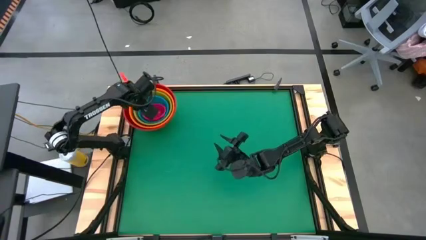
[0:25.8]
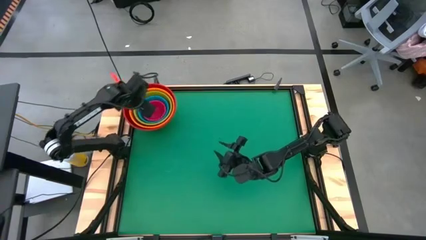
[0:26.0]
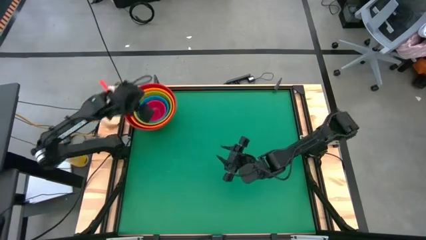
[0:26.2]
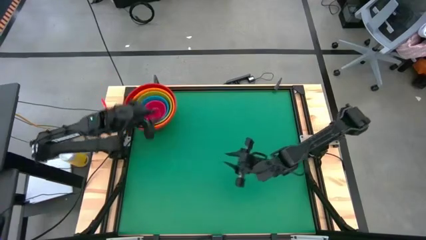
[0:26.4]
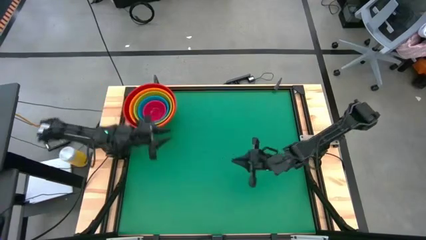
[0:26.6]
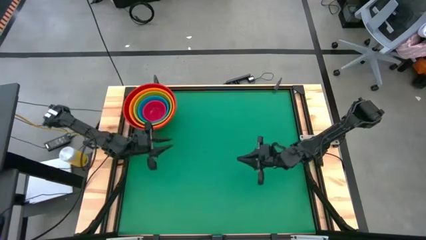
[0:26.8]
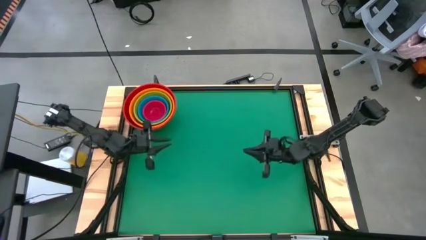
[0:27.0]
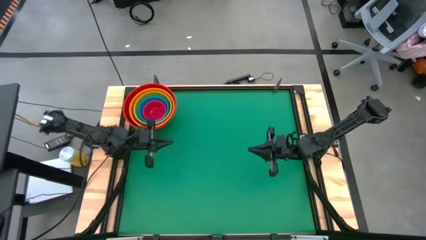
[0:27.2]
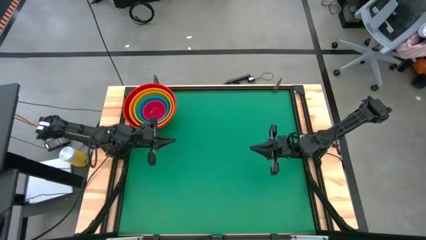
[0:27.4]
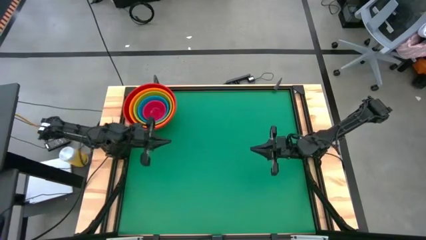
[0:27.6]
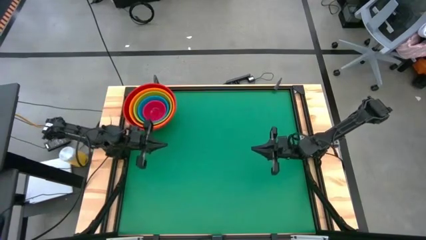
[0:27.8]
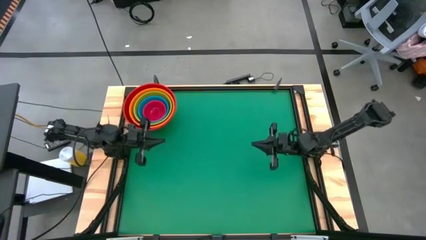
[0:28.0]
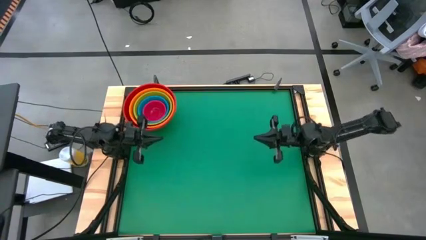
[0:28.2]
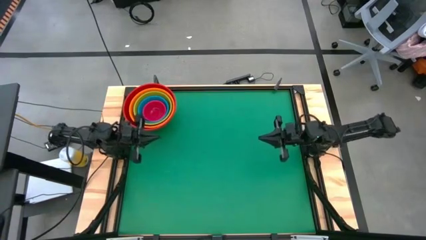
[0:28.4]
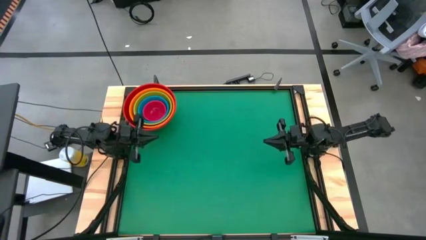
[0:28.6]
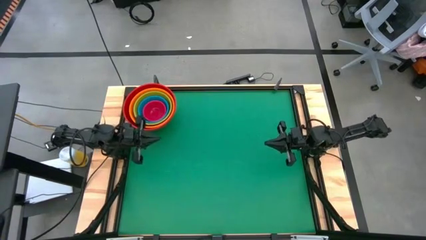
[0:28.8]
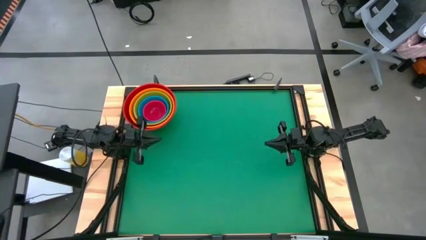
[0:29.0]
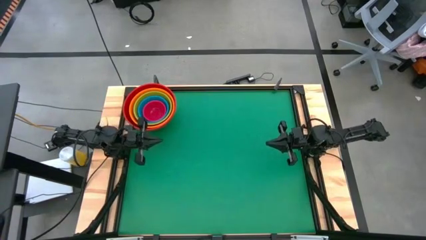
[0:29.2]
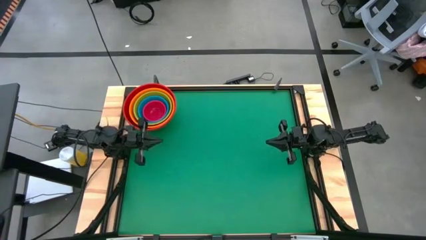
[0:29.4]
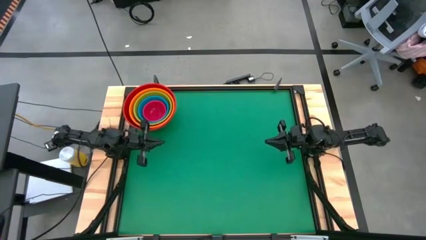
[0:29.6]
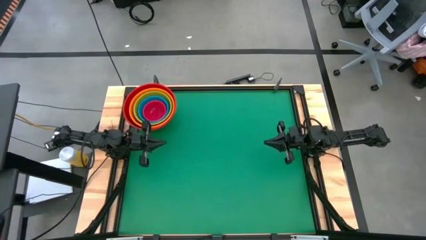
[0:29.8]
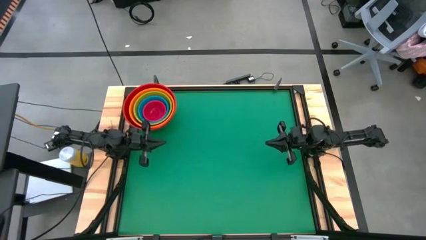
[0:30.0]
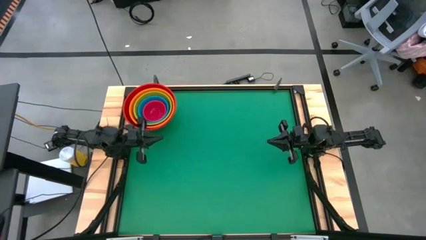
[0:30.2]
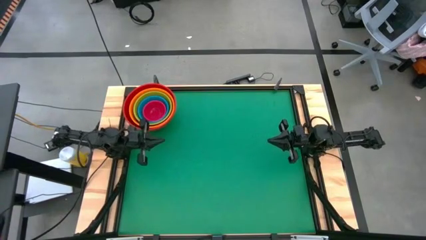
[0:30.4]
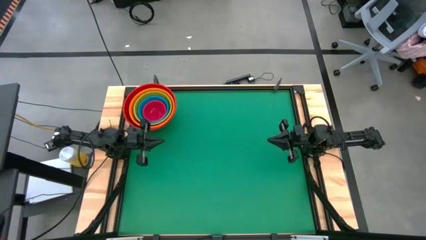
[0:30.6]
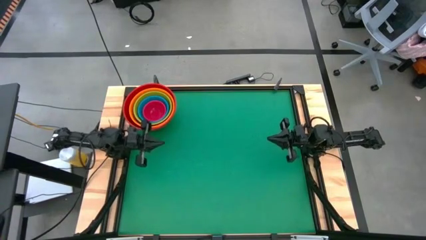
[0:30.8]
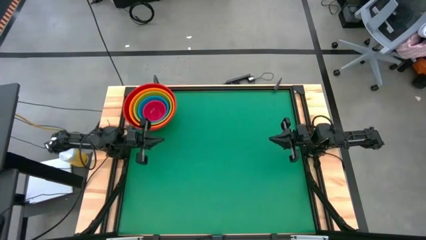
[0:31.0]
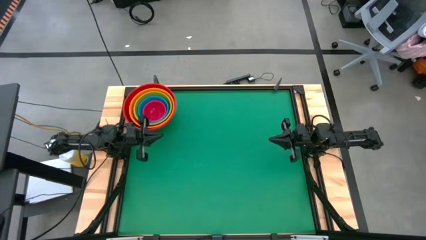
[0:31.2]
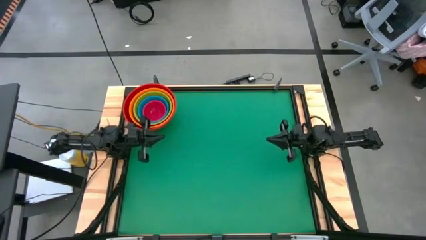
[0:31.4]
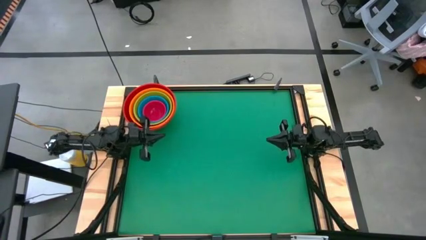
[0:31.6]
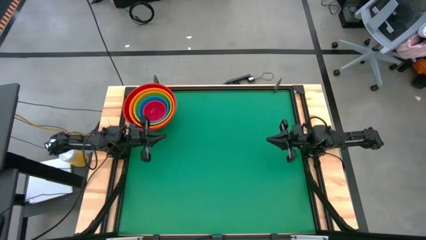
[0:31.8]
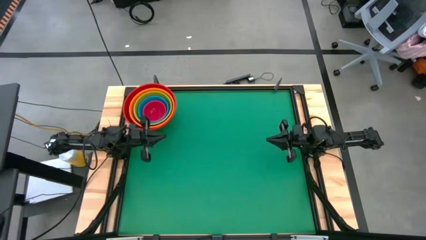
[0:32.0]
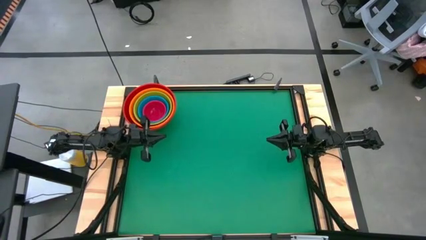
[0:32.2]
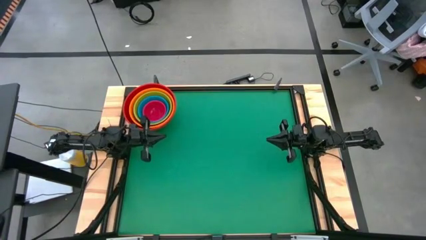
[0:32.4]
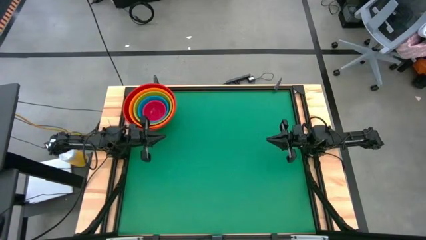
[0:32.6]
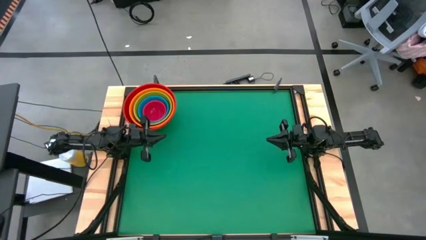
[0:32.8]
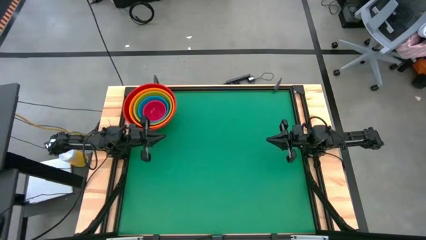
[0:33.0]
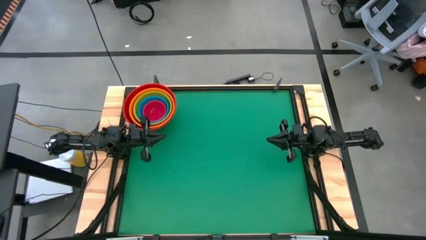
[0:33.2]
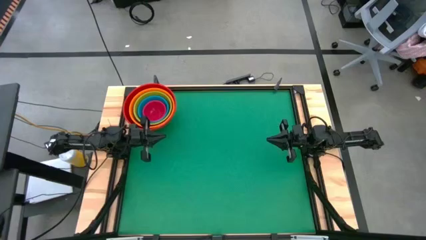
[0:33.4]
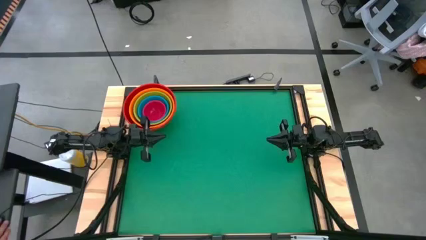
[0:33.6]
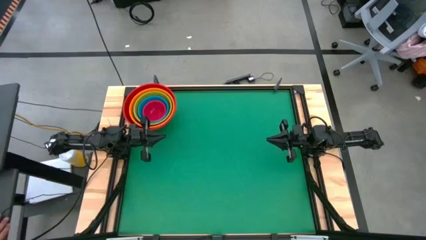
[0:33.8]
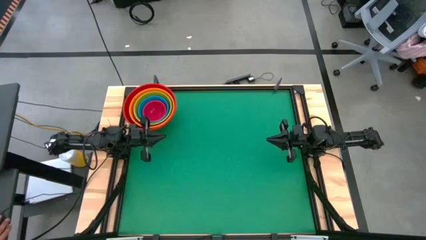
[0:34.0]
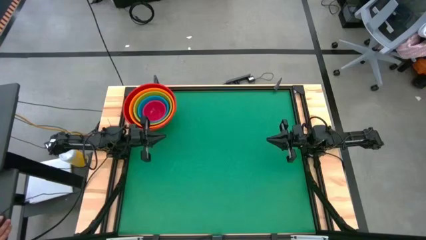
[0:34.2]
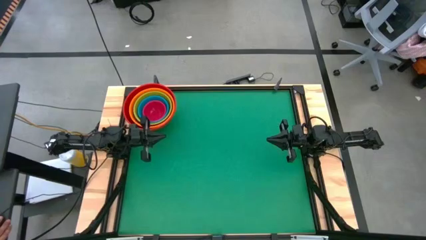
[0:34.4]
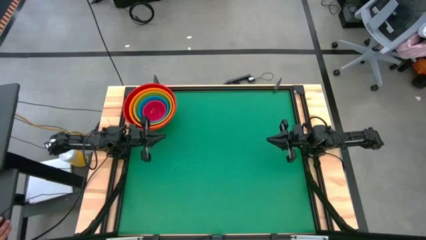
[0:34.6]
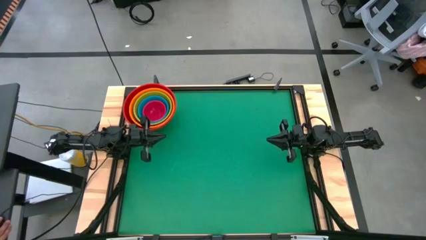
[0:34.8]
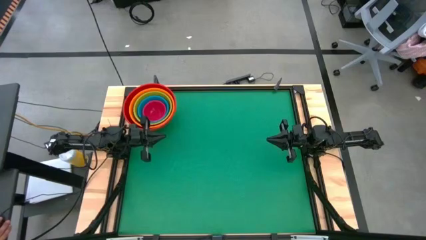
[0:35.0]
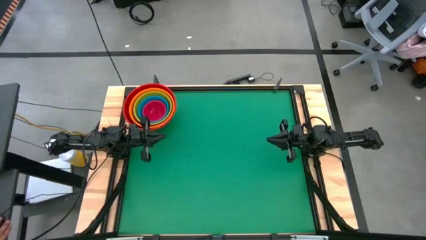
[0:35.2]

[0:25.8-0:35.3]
Return to Home Position
